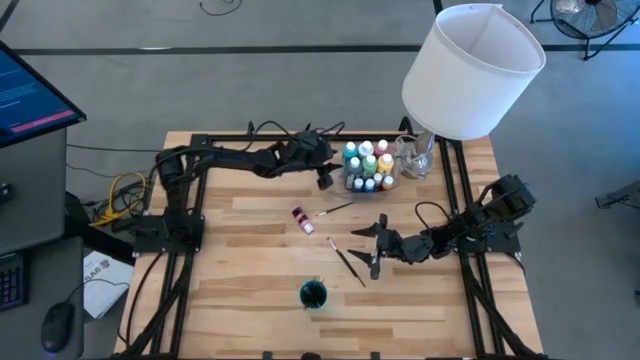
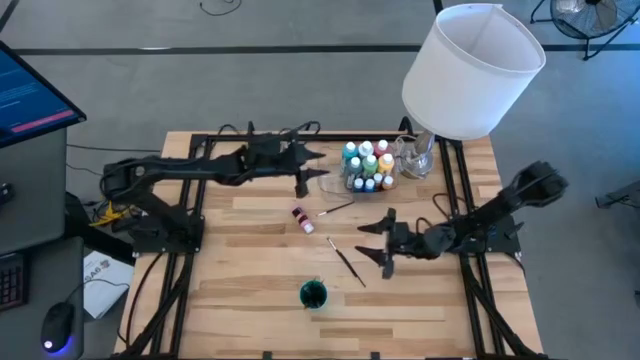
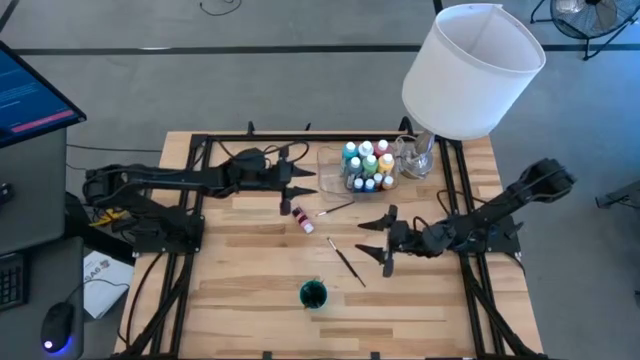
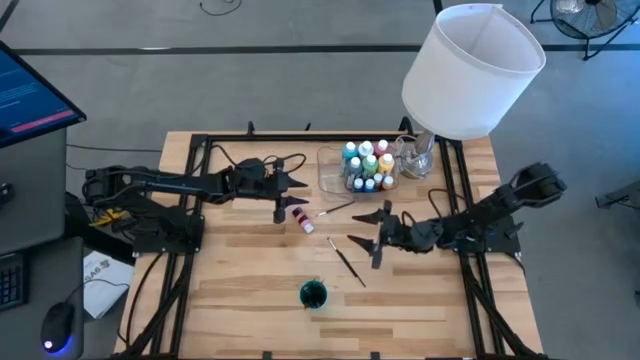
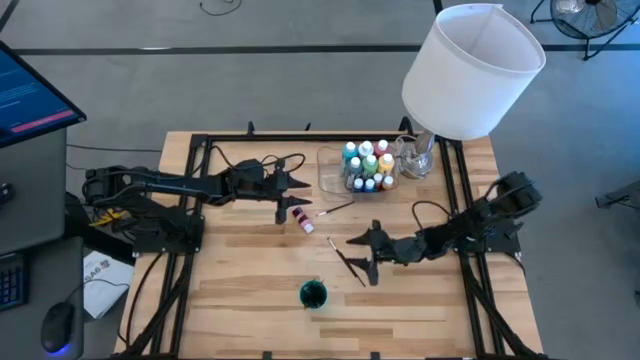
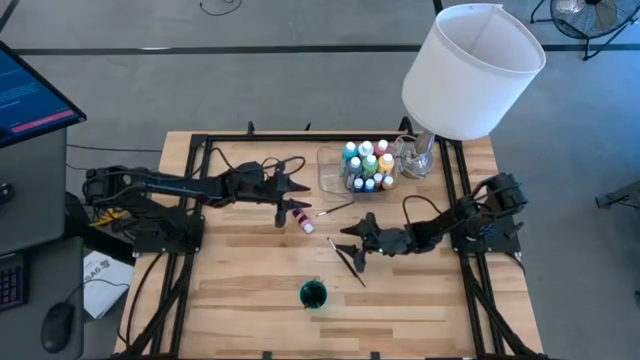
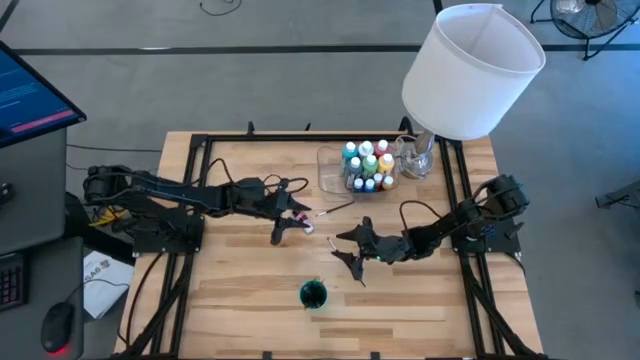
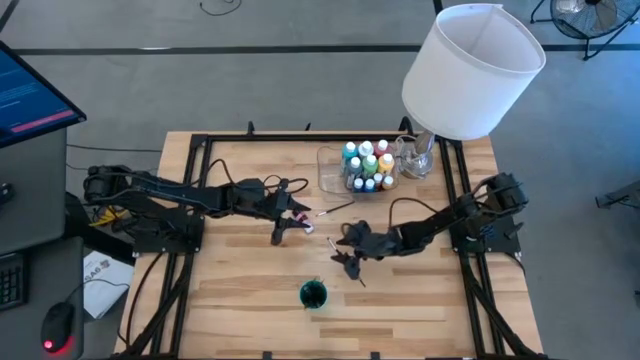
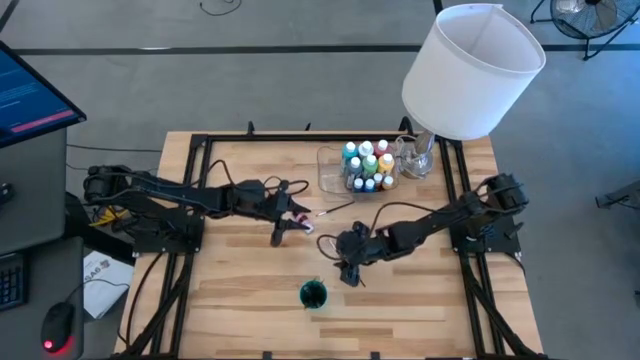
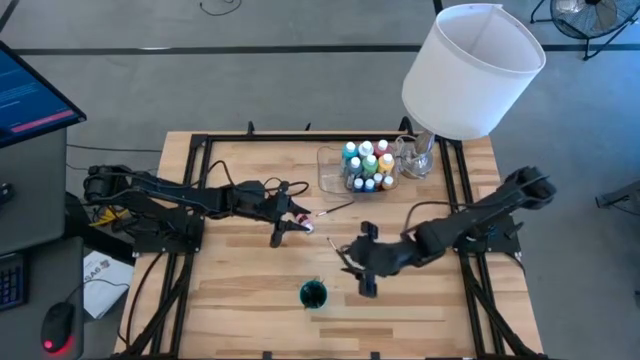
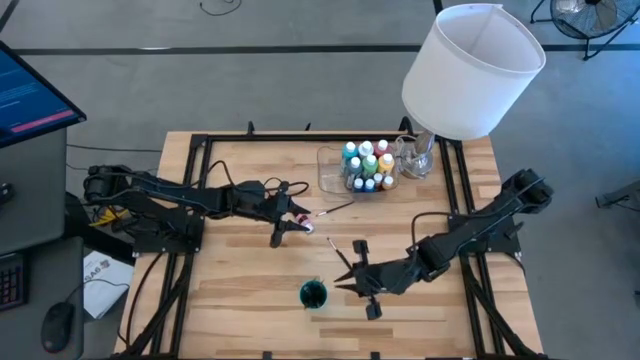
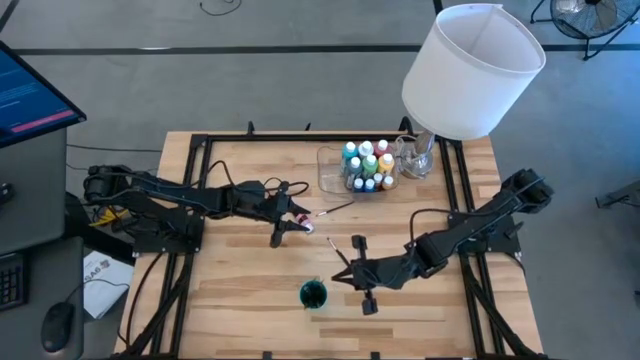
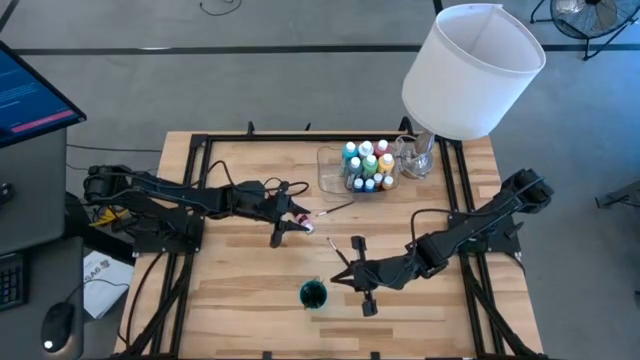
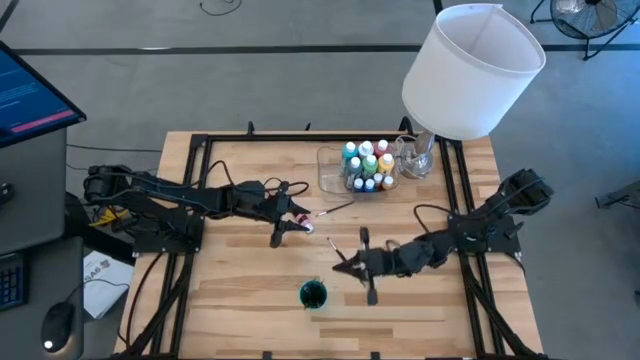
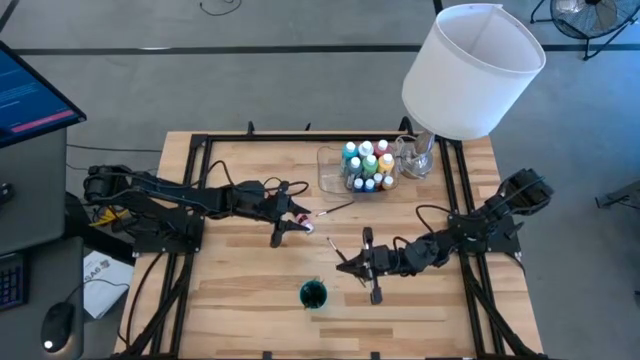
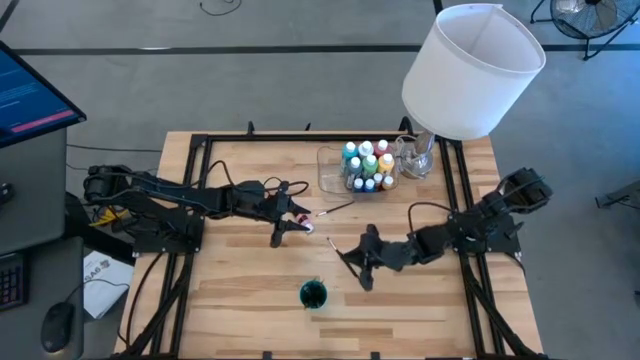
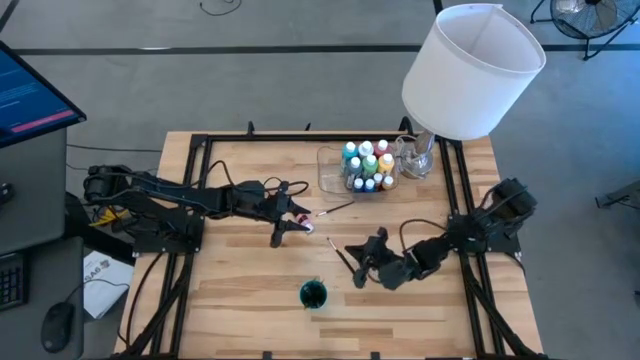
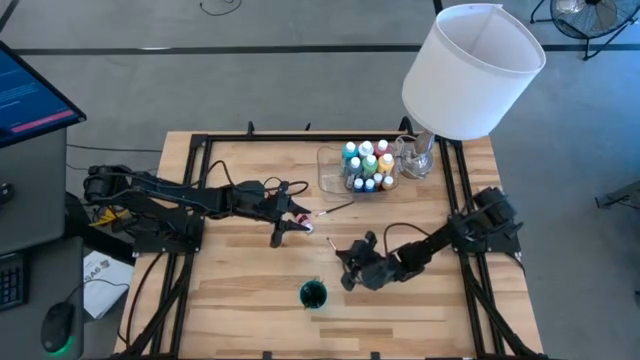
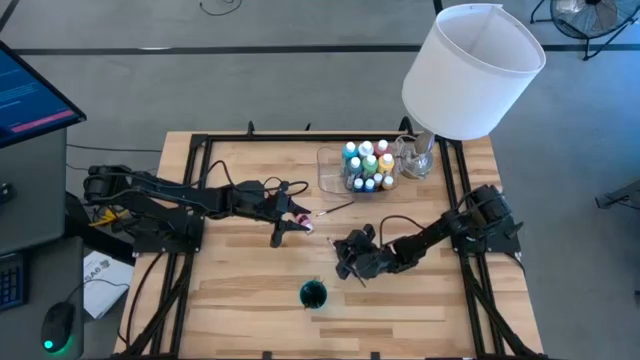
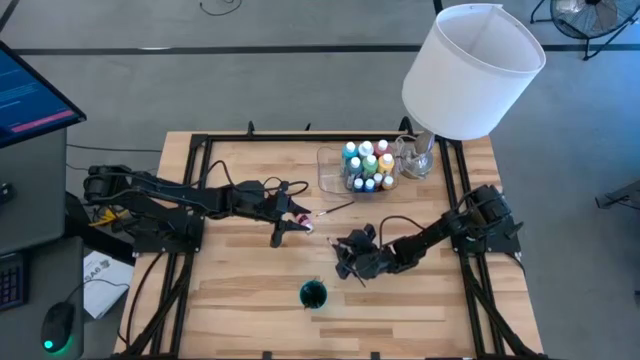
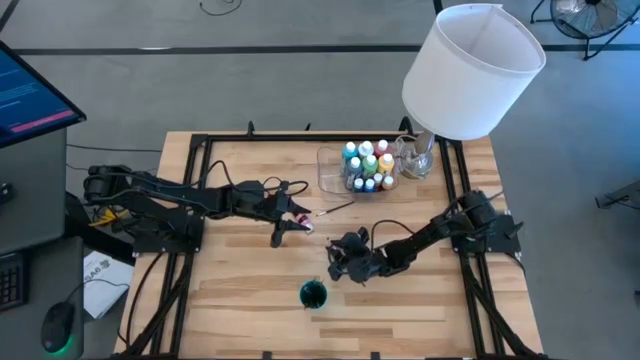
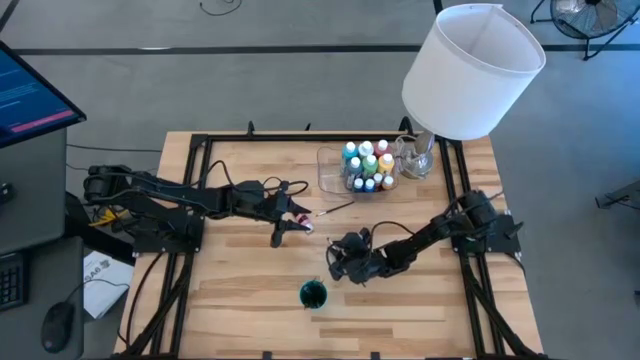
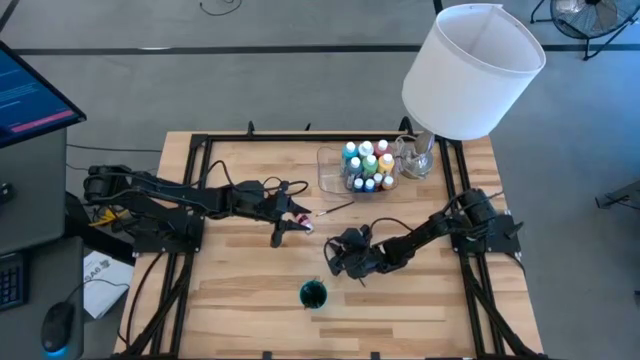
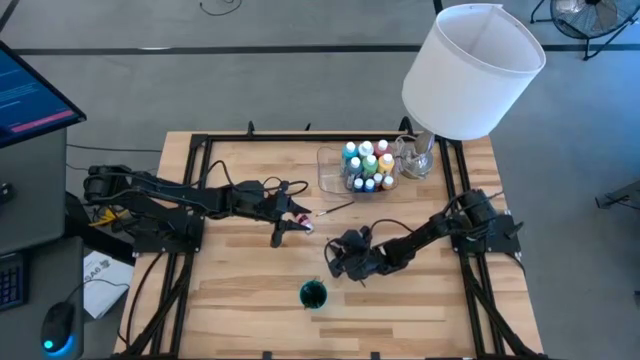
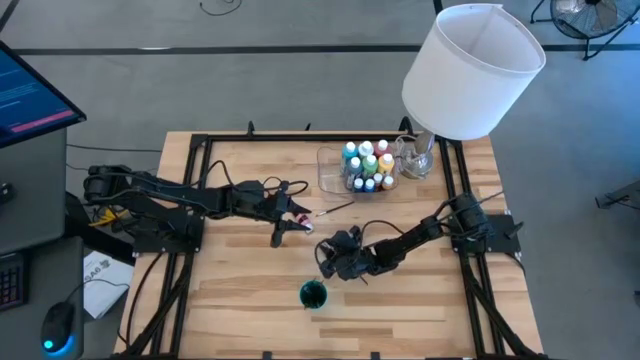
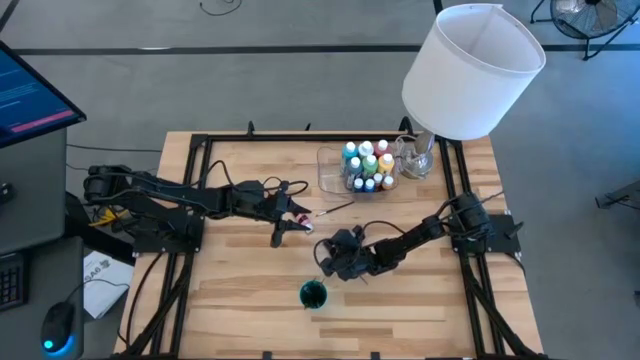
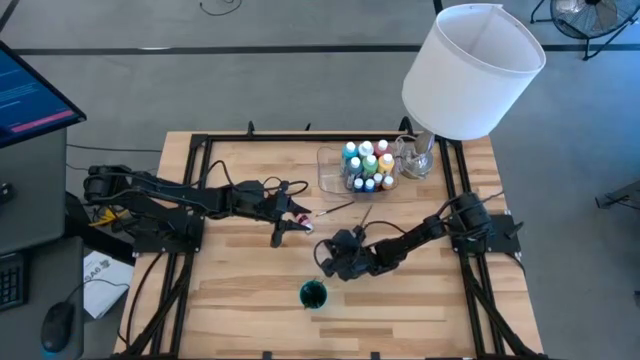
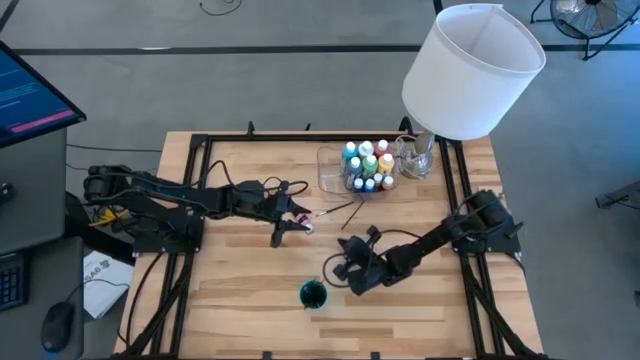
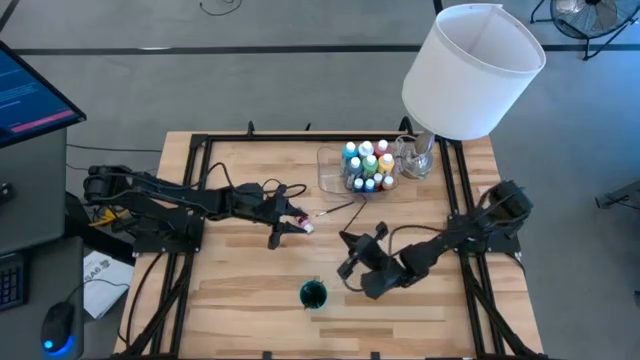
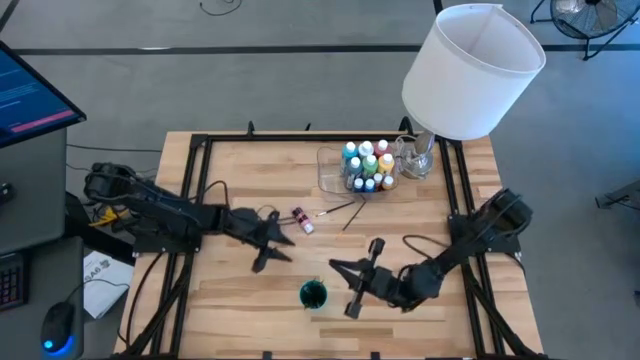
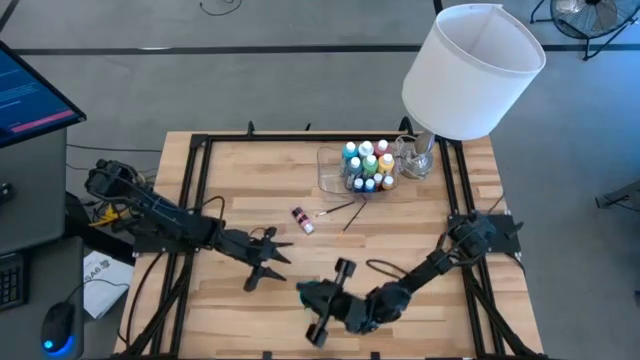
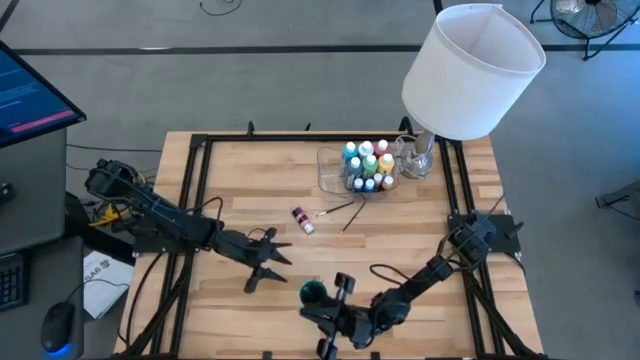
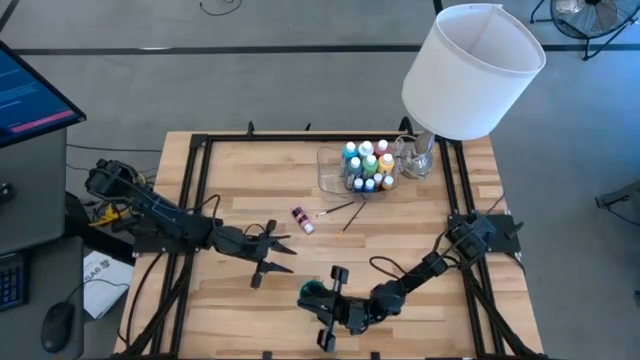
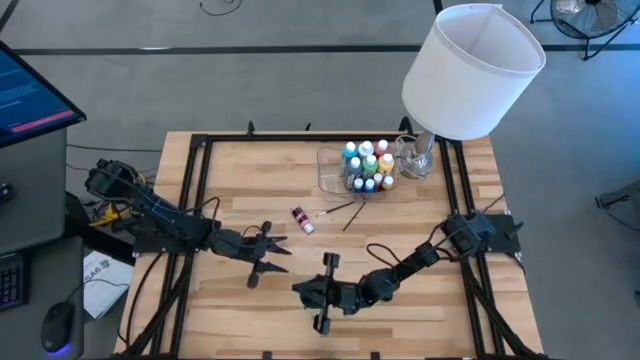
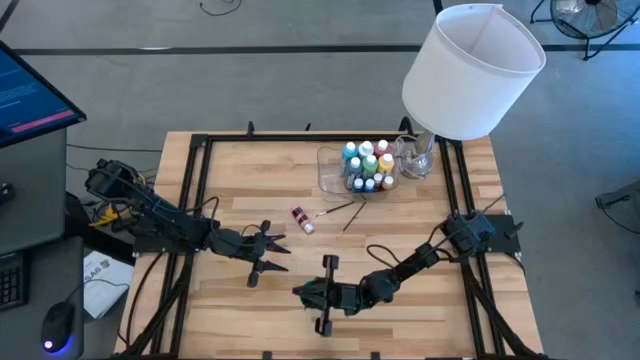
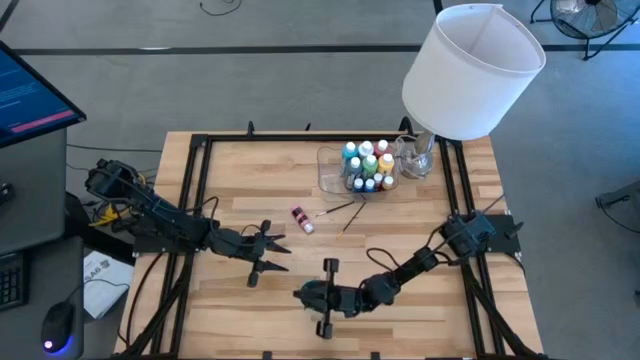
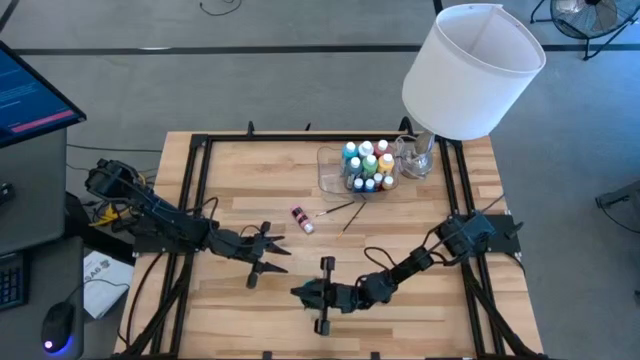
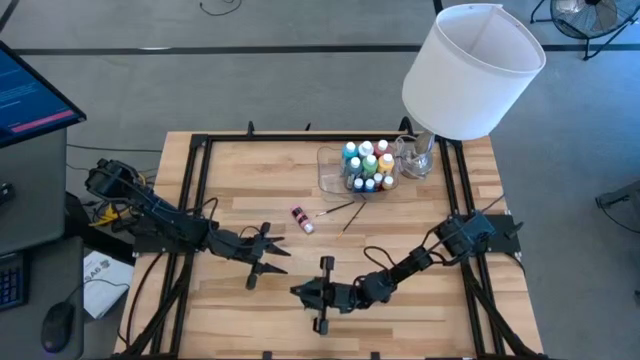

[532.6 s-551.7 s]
Task: Pick & Place Paint Supplies
Put the silver paintbrush into the green cup
